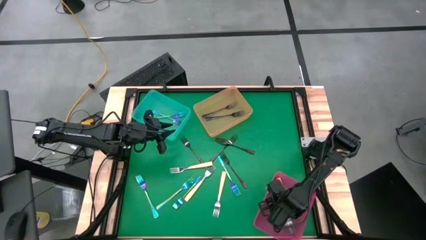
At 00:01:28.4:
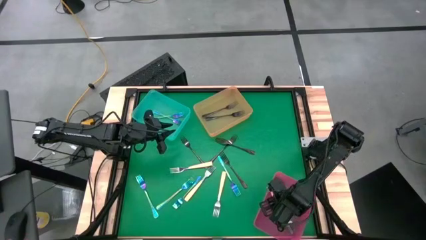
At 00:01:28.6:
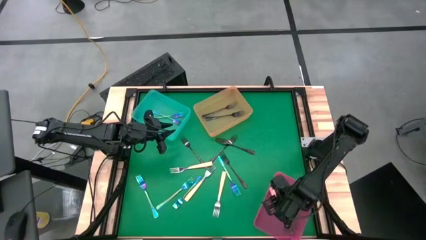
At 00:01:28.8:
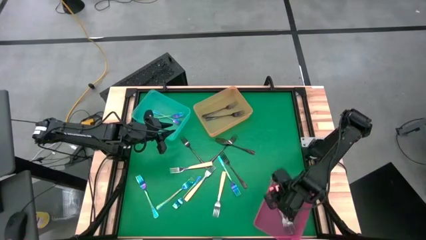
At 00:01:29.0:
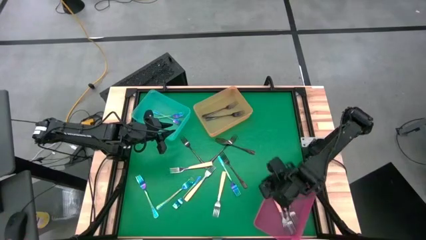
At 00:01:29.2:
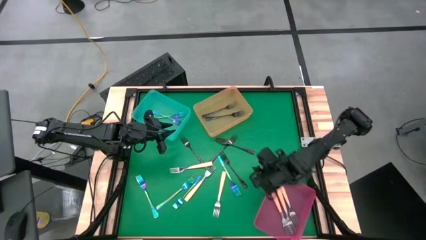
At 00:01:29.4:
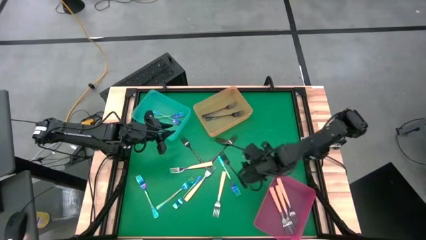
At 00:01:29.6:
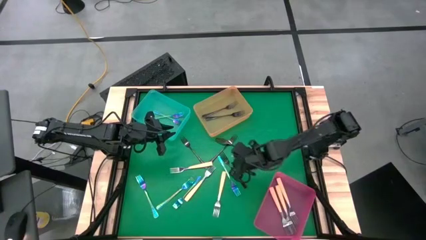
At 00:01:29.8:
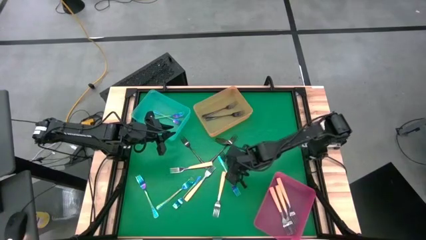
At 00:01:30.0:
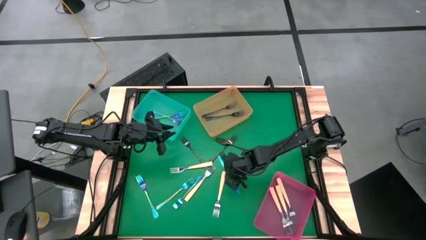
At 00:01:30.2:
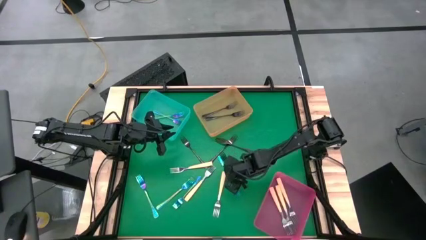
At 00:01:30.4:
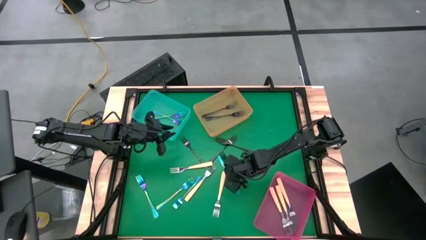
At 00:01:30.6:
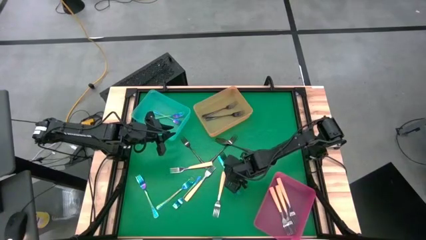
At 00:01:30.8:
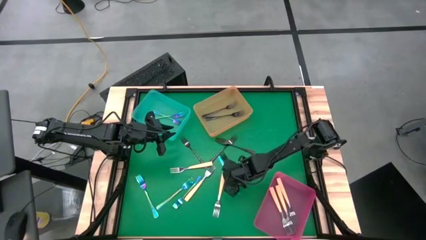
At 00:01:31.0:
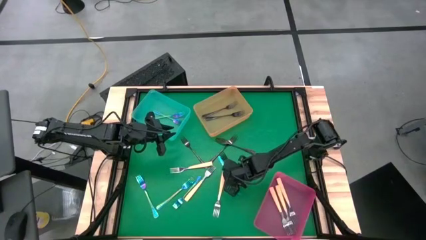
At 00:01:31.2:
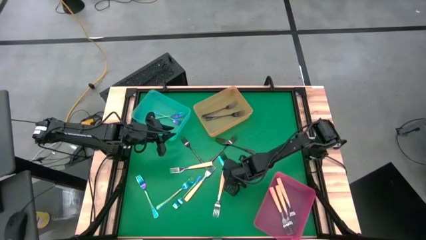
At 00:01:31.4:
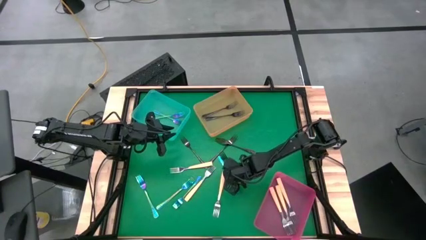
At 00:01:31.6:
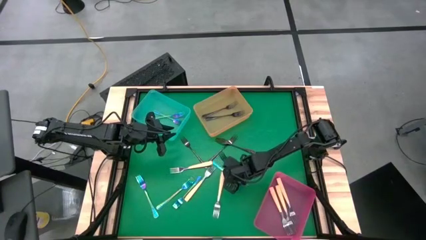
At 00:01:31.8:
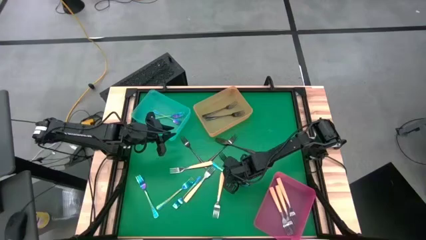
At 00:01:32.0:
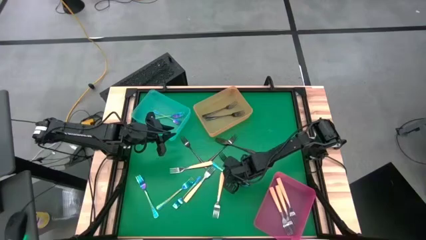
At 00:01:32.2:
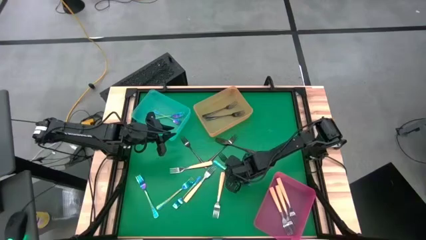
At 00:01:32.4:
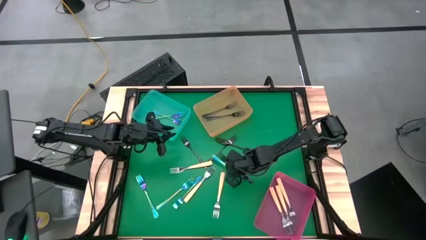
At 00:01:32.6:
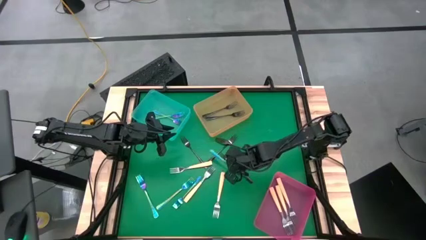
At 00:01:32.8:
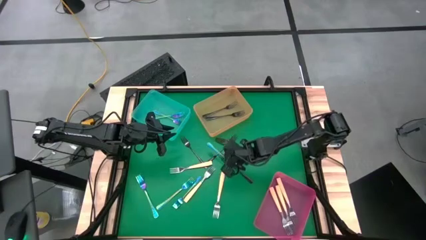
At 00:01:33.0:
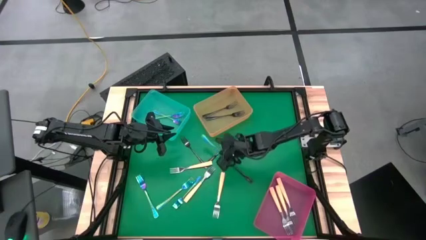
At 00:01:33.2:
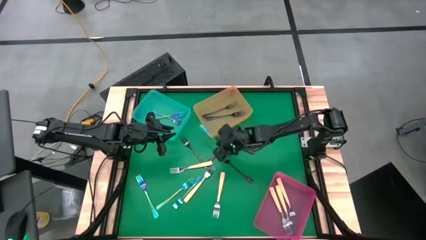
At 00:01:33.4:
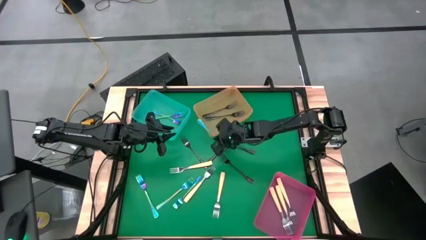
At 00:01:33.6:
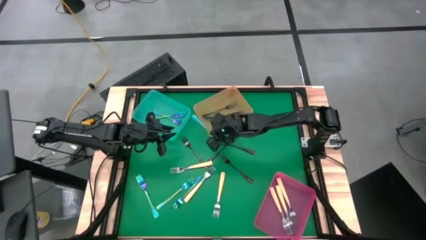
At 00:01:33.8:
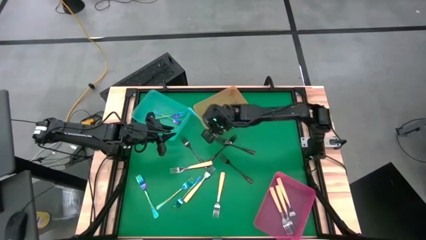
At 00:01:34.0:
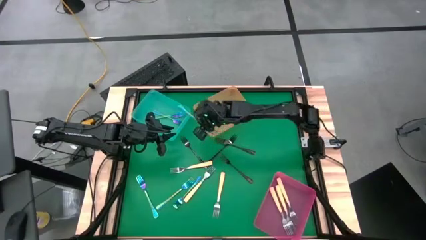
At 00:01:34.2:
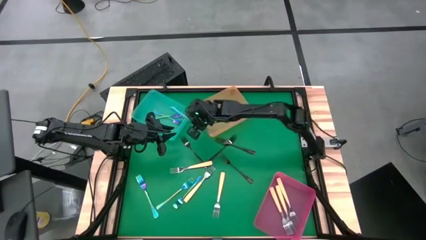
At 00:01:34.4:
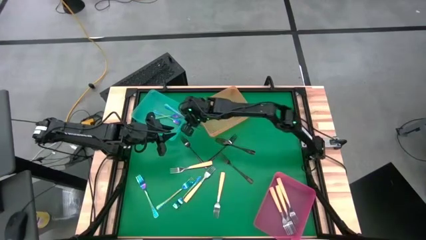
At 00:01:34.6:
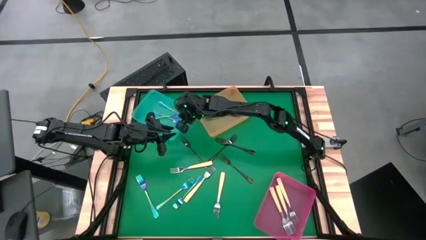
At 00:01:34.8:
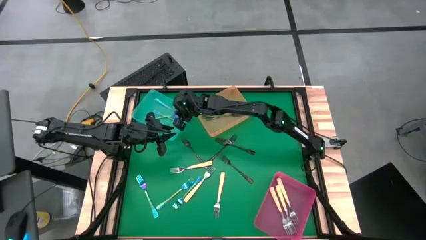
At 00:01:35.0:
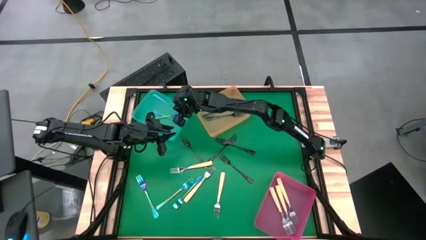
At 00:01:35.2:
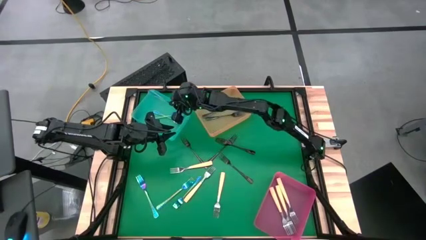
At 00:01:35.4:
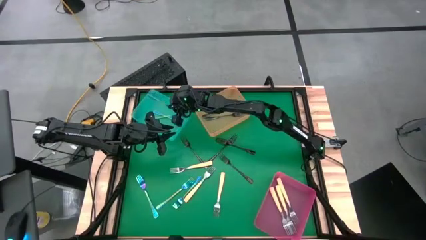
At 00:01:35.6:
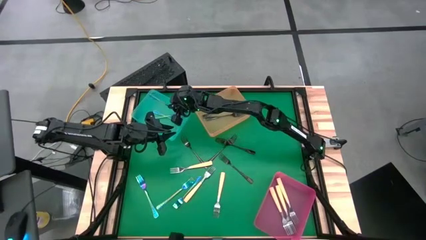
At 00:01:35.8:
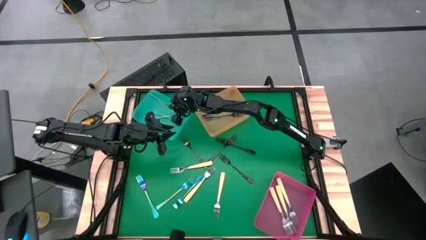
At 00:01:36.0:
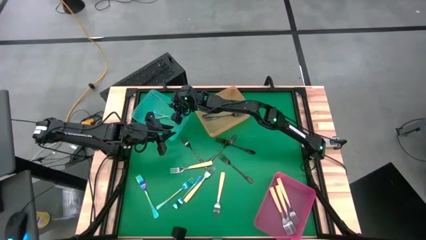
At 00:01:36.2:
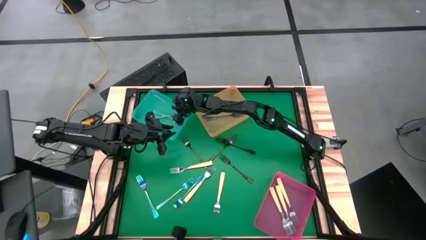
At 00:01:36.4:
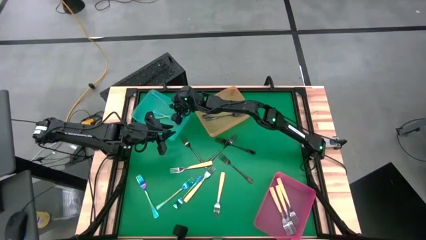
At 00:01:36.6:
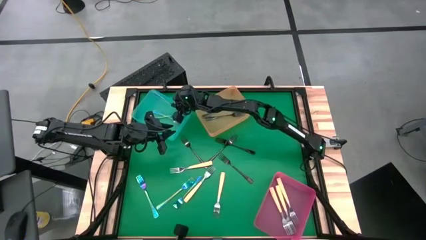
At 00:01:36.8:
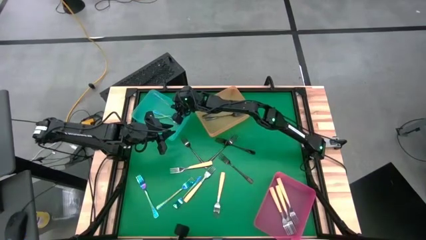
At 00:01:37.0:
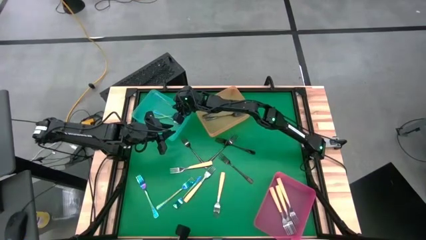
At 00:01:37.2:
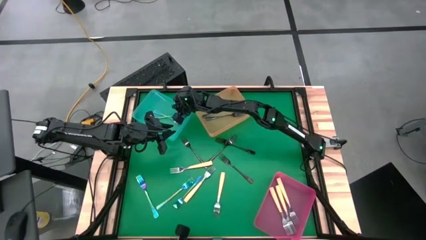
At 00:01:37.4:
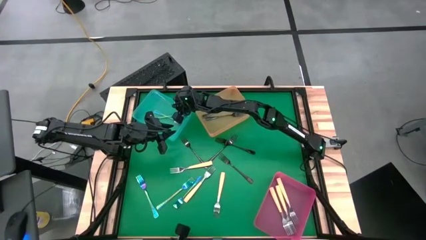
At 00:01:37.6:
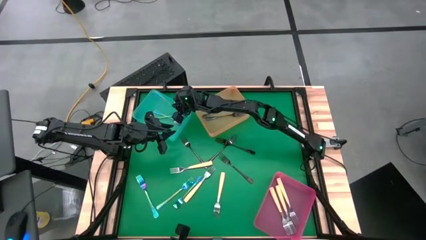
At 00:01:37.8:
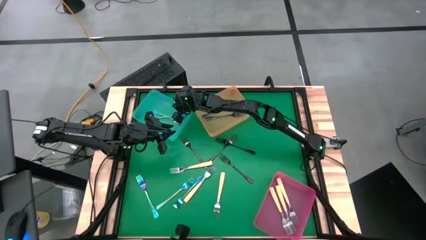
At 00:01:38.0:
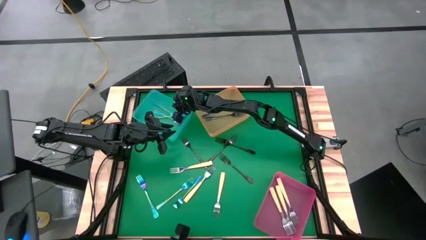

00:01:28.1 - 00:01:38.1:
Task: Sort silverware by color (type)
Put the blue fork into the blue bin

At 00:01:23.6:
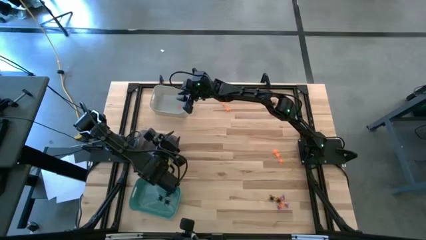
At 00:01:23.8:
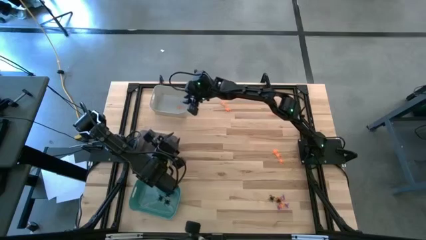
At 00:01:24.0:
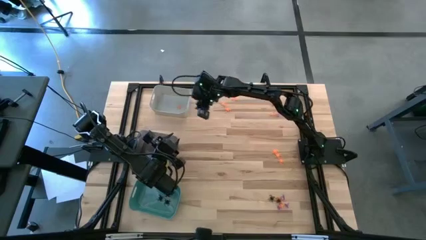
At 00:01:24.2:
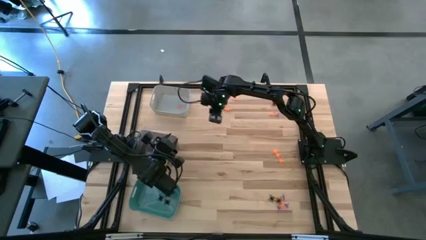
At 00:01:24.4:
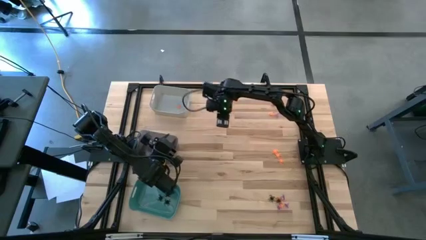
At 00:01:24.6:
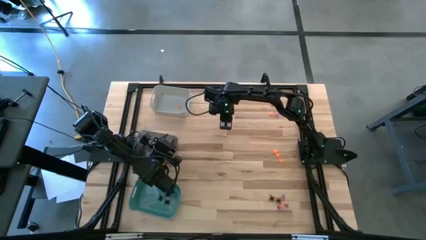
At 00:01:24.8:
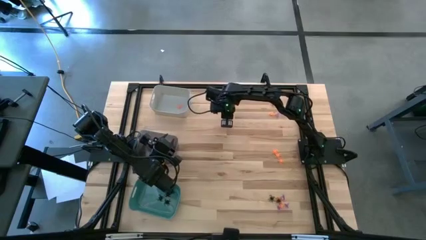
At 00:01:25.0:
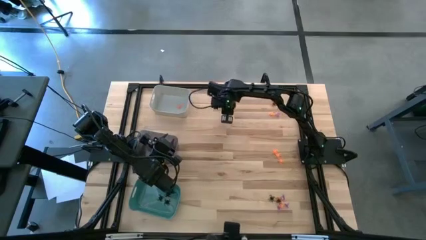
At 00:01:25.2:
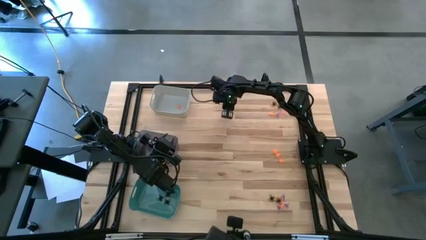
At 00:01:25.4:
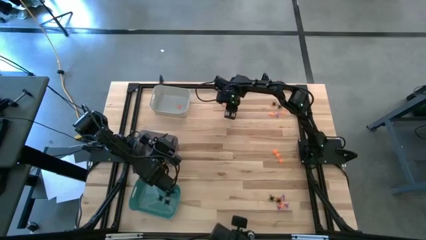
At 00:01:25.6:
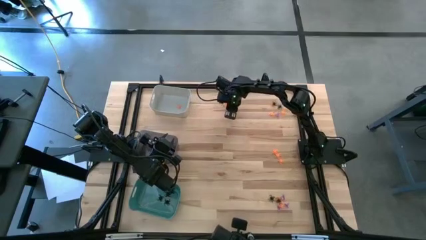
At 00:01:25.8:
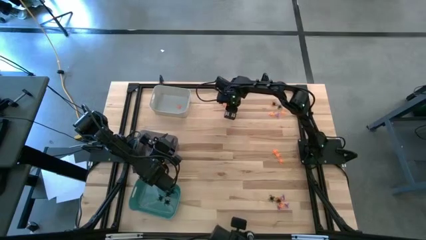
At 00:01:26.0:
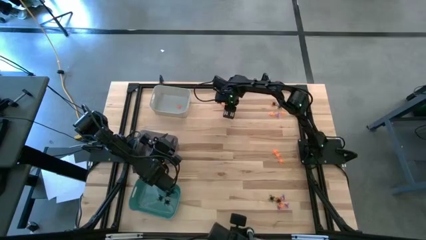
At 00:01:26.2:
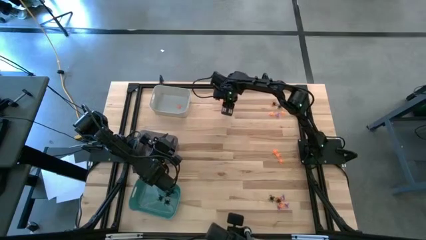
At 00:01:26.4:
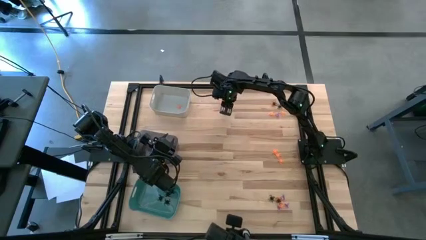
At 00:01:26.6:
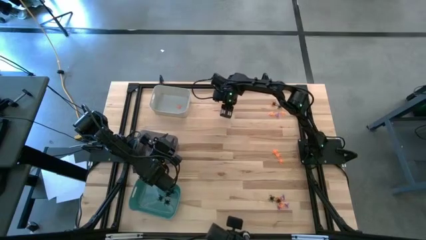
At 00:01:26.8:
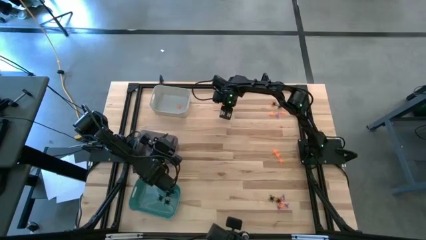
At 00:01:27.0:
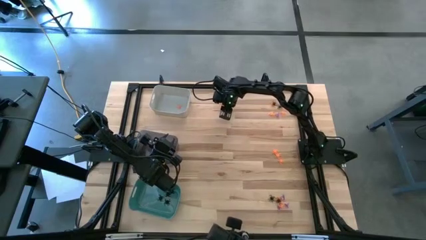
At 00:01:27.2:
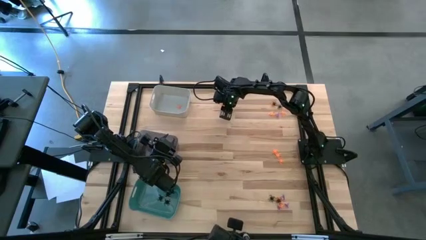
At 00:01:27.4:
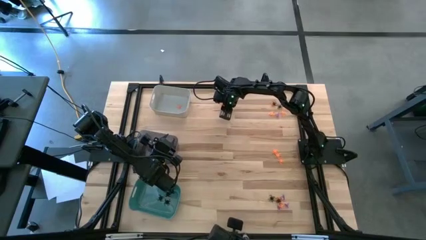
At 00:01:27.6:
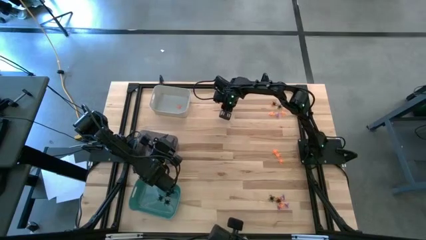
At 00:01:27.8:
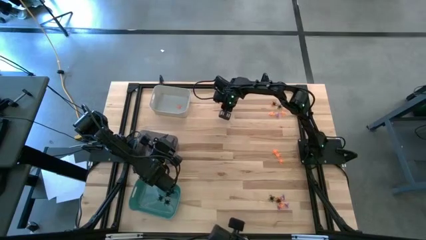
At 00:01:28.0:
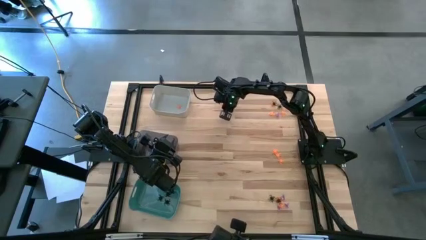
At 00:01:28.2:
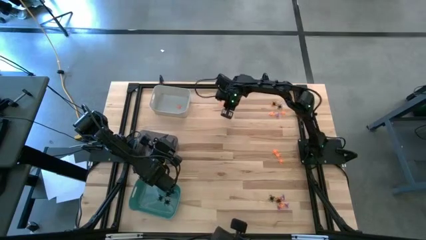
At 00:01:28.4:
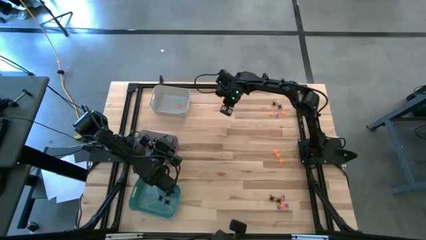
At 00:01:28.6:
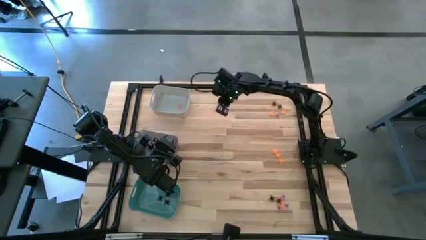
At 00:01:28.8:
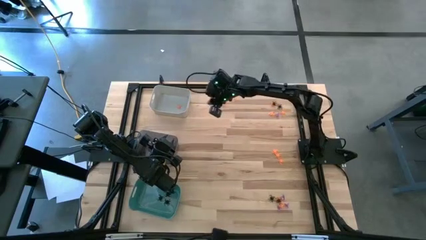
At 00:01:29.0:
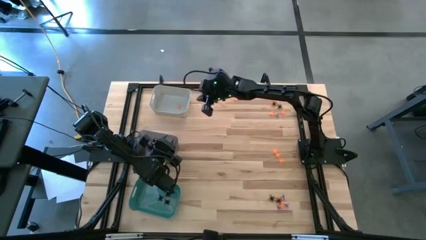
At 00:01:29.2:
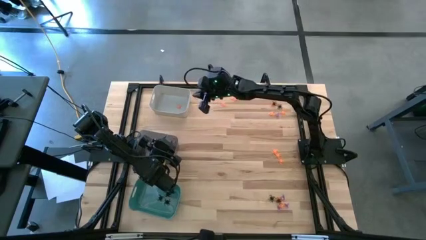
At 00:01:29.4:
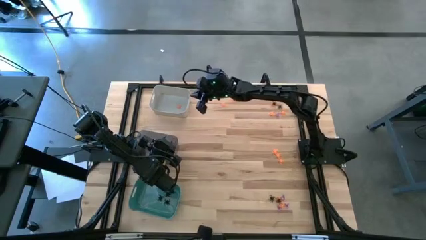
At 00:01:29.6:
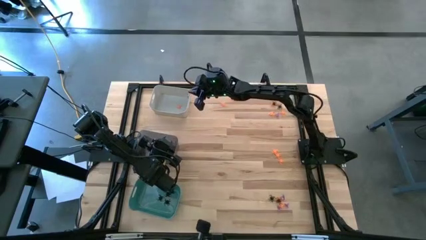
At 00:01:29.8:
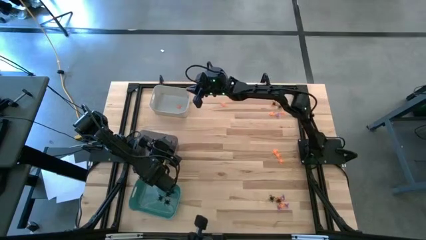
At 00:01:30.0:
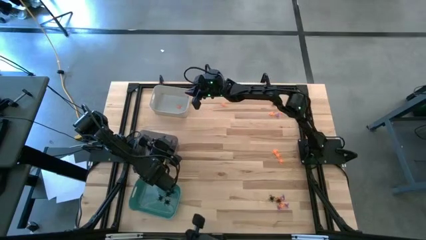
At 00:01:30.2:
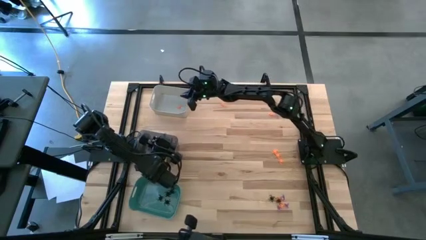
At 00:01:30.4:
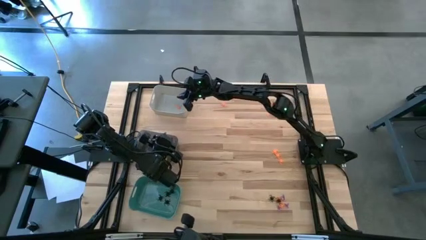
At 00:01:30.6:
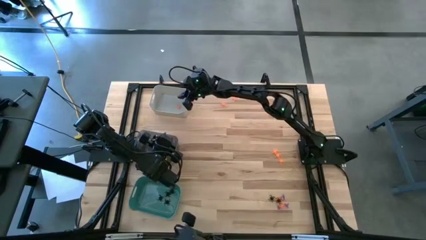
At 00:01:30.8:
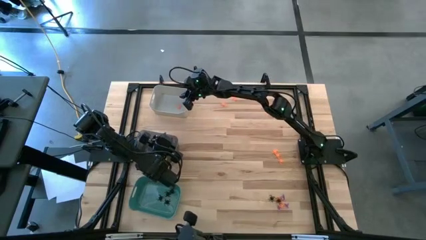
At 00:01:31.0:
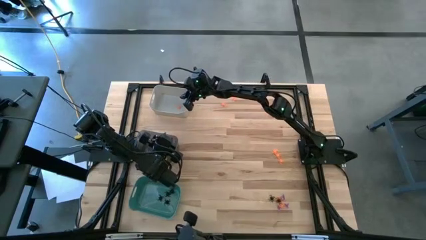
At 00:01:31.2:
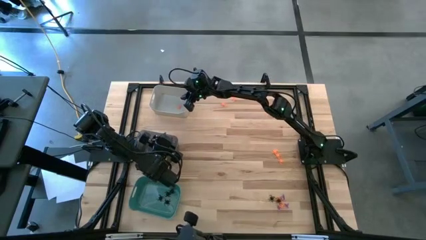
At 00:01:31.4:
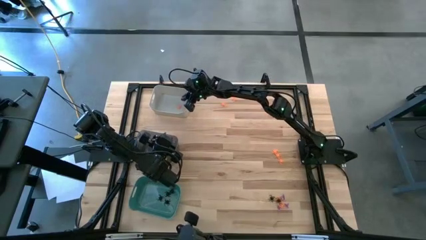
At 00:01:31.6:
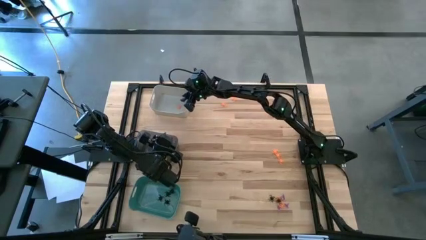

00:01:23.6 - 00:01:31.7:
Task: Sort Halloween decoration
Put the top center orange spider into the gray bin
